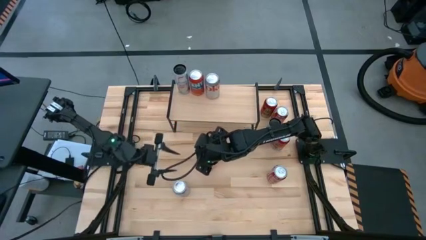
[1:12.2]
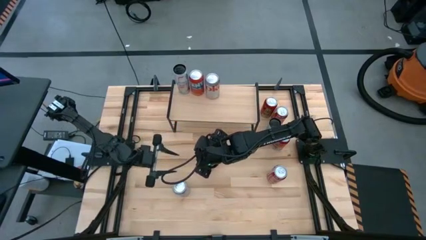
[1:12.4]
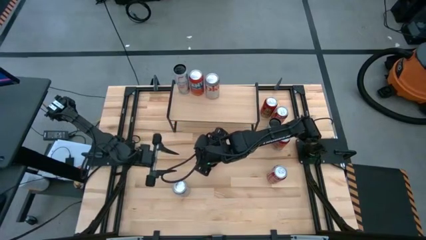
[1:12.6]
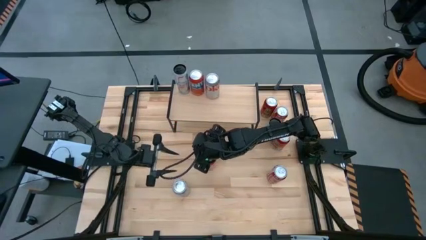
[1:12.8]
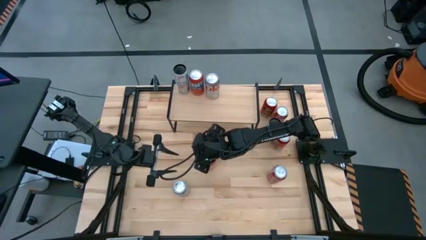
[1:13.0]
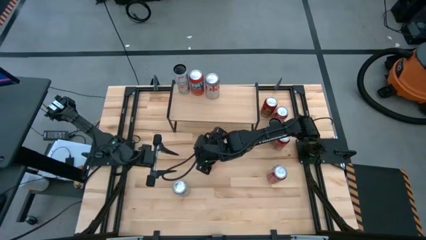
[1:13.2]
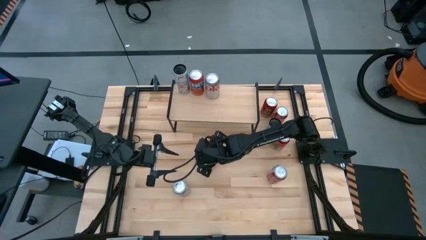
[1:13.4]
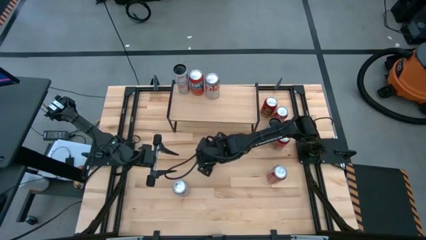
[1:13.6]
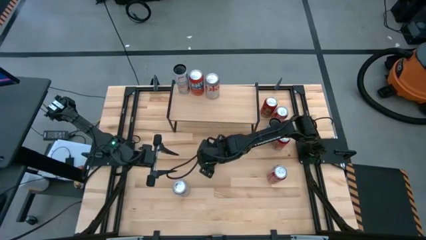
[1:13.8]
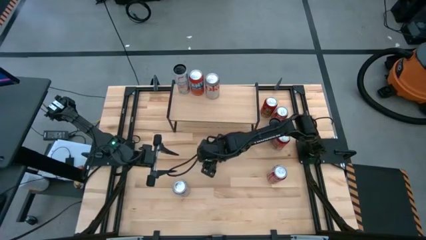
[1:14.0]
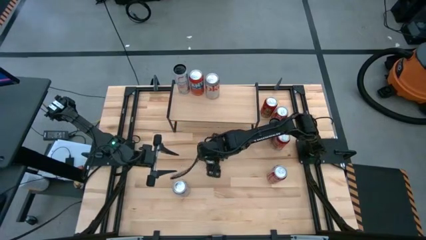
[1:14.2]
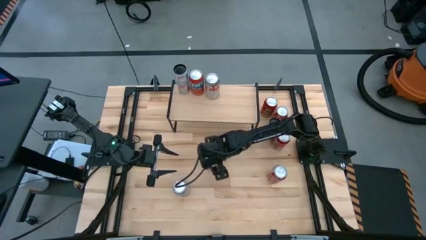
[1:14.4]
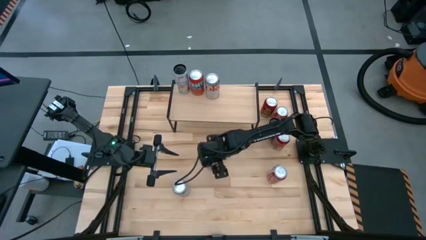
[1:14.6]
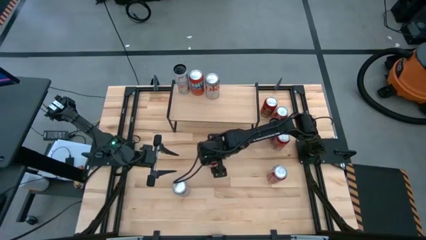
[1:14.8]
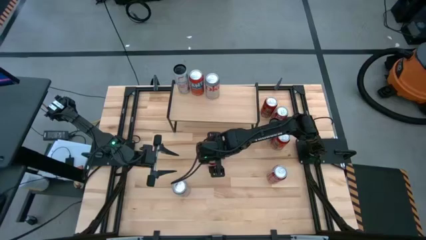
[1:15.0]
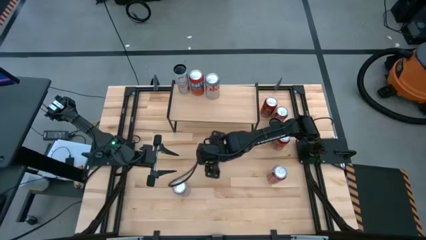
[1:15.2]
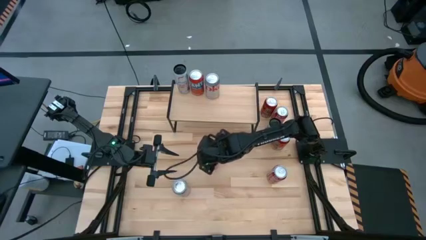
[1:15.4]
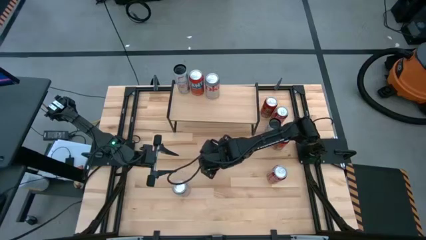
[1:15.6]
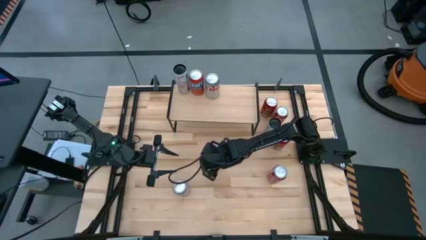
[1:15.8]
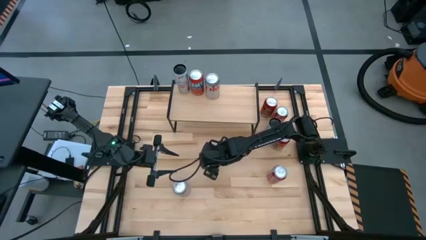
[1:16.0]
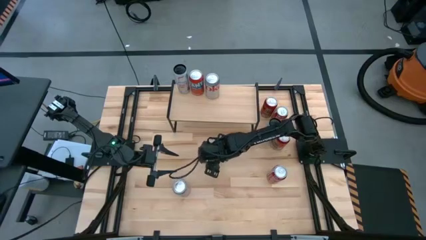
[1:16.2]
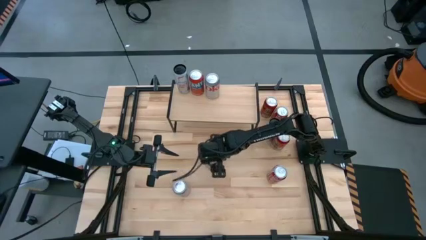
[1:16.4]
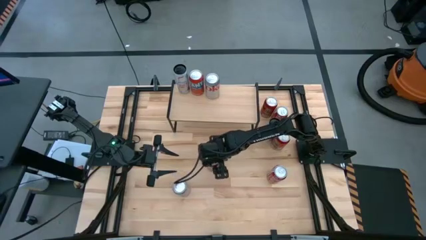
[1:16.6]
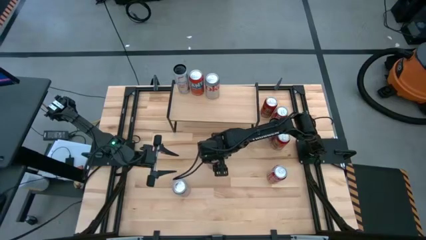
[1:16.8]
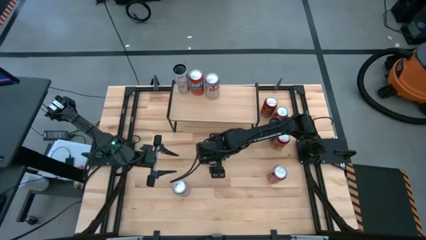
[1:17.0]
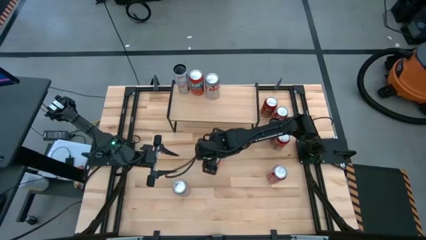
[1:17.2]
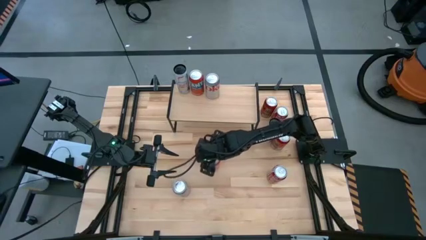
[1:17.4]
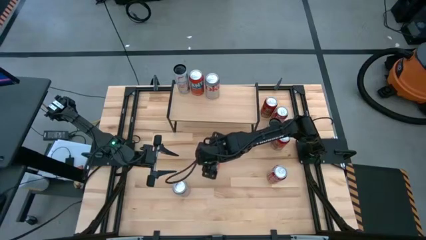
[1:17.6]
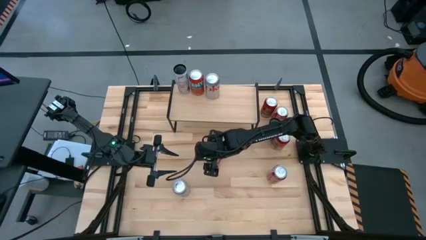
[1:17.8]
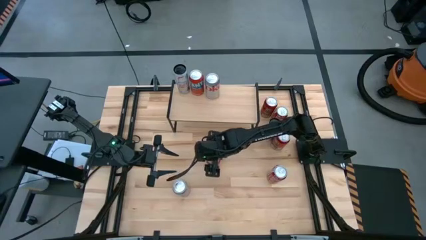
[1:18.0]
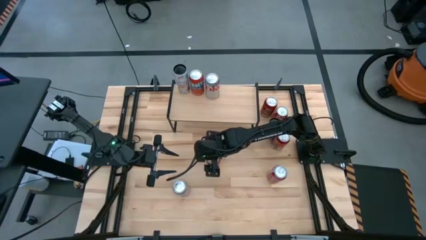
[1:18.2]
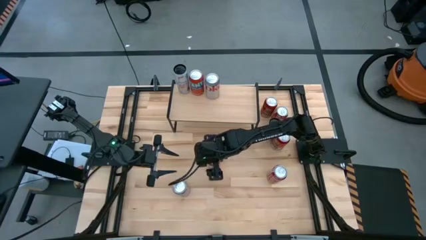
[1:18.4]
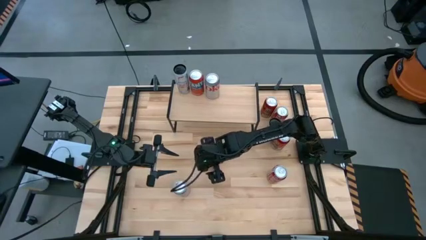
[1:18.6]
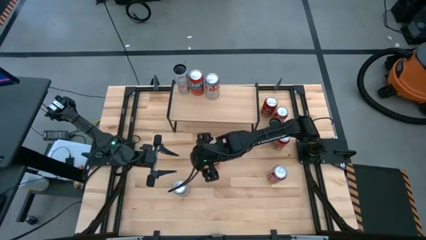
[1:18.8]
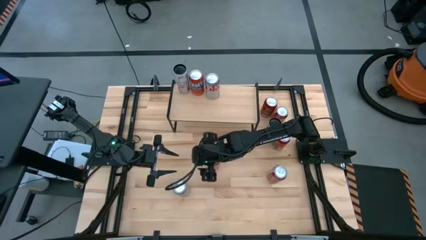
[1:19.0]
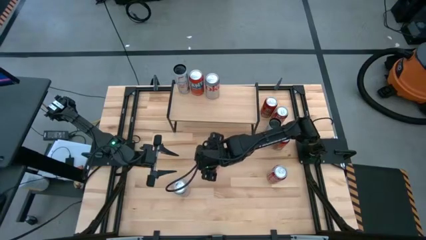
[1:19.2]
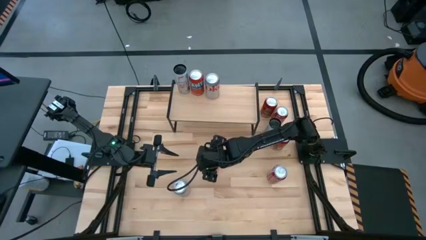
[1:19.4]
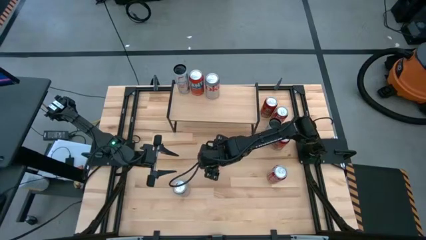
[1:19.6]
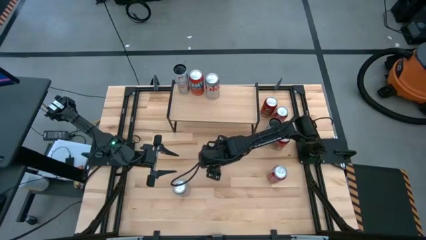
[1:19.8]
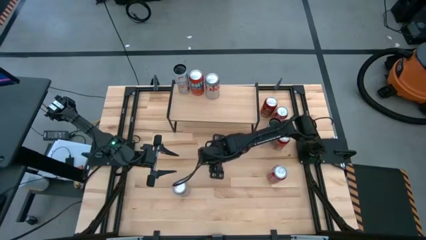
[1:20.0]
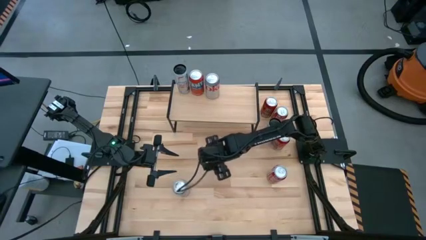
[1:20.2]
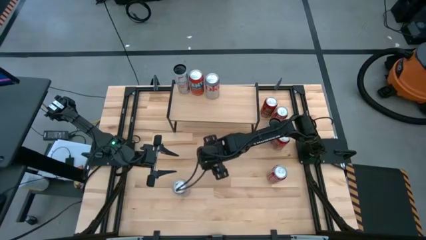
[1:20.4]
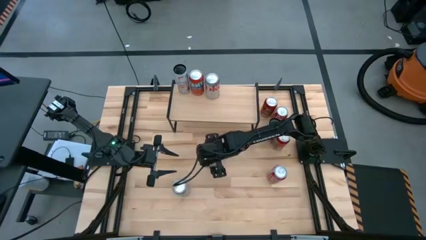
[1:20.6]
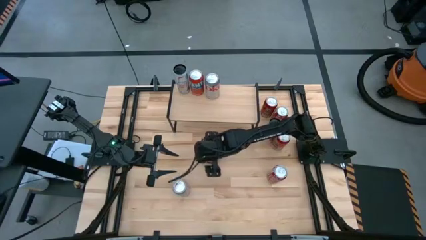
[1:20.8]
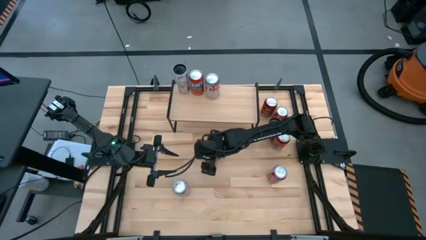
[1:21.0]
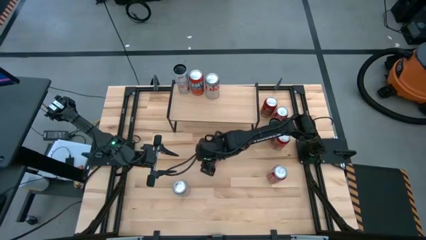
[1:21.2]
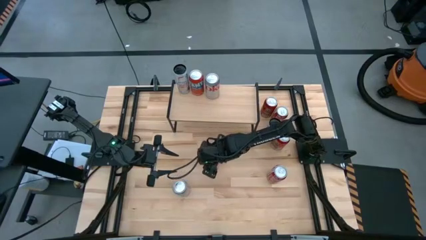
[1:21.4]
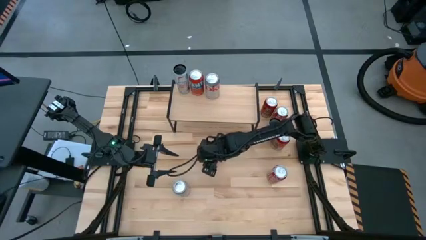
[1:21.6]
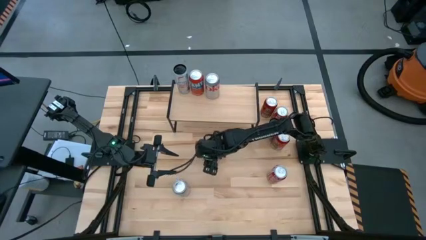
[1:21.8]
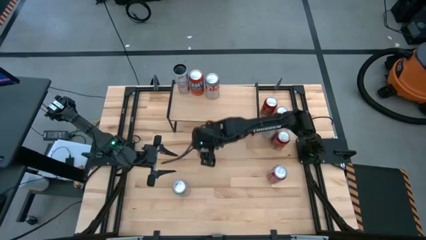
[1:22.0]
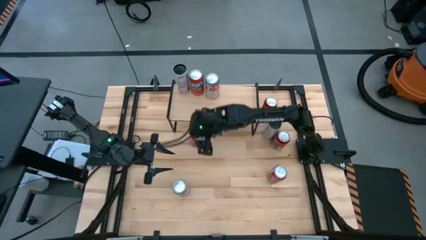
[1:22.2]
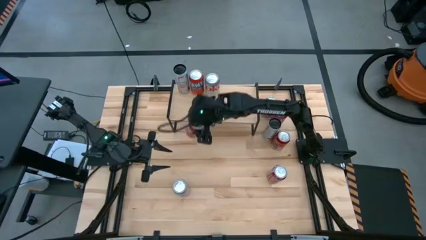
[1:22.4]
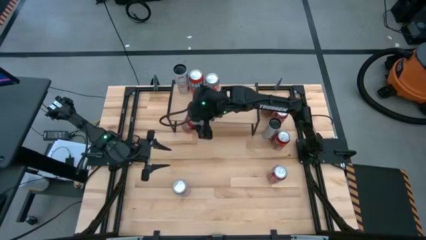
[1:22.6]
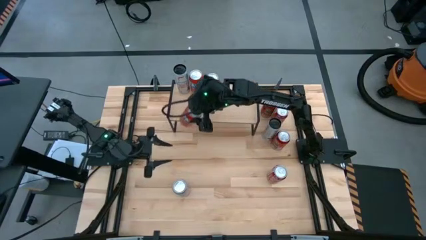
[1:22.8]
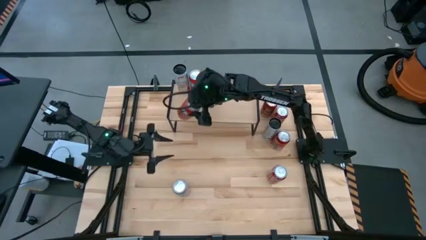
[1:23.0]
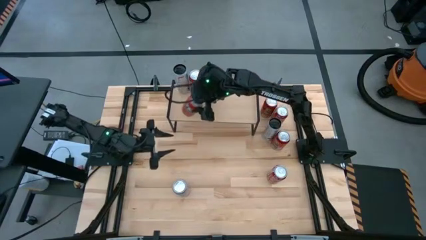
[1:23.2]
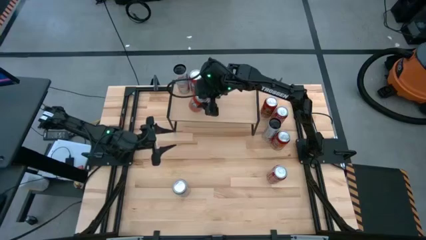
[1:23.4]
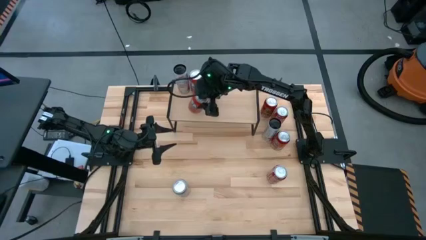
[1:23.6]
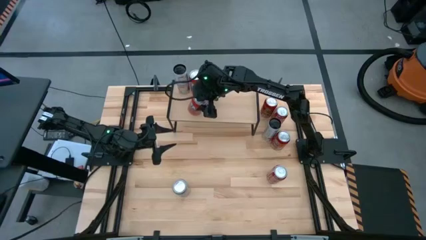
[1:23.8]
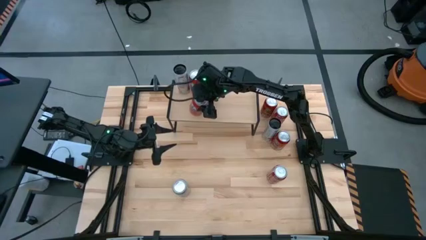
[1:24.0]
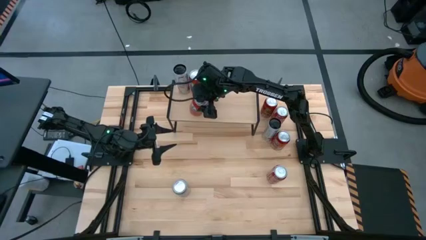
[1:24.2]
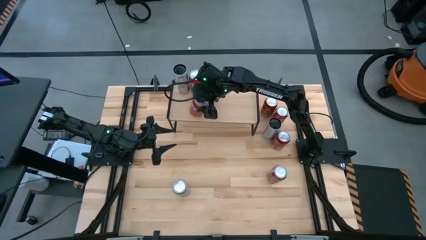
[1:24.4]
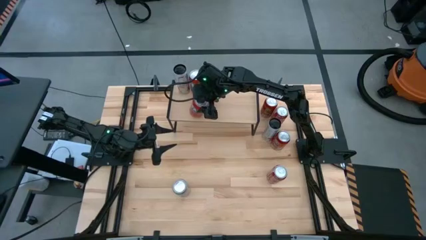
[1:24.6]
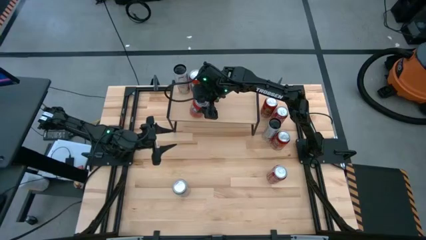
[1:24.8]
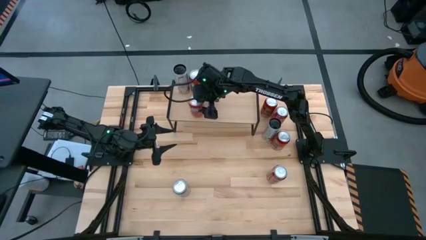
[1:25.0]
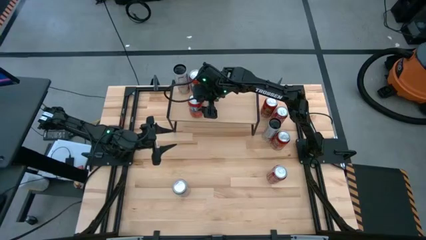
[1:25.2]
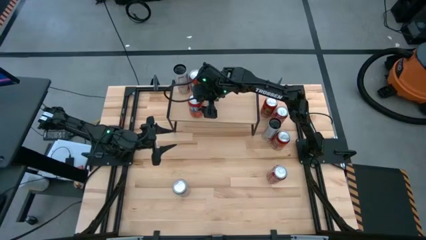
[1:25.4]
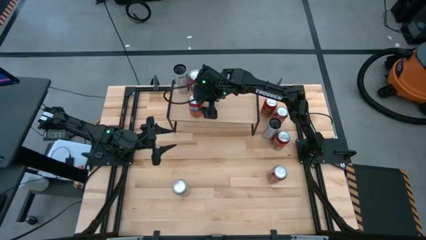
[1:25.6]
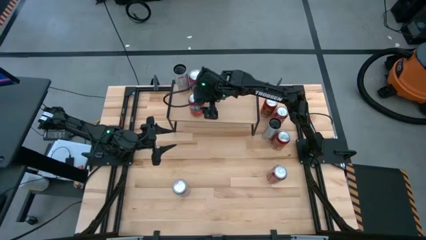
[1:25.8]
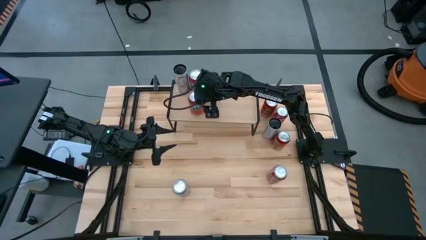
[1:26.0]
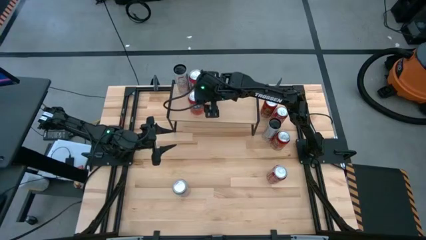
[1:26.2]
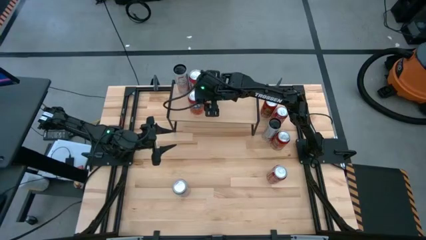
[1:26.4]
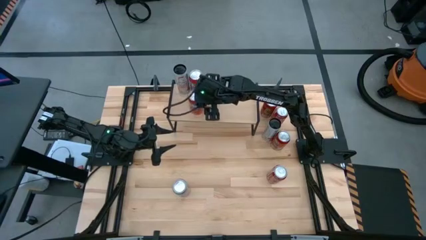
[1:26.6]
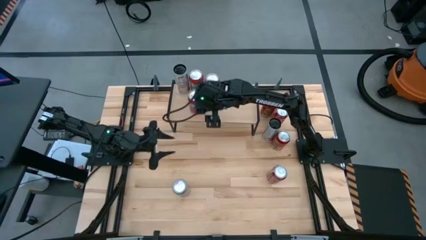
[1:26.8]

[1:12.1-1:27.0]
Task: Place canned beverage on shelf
Put the center orange soda can on the shelf aligned with the other orange soda can
